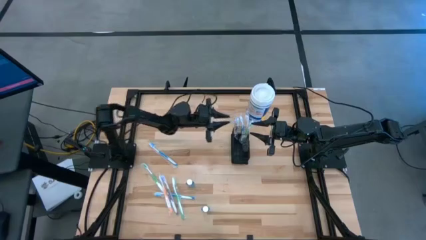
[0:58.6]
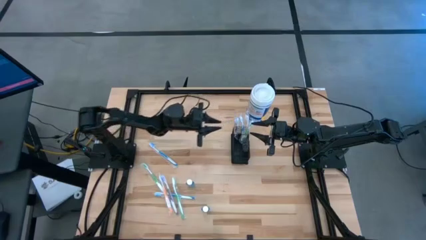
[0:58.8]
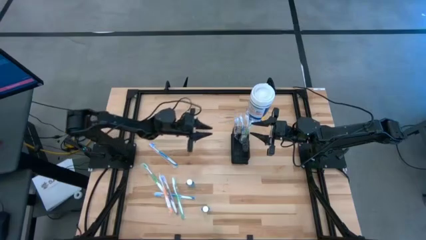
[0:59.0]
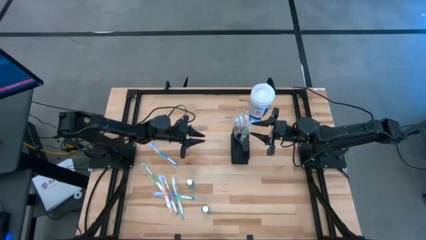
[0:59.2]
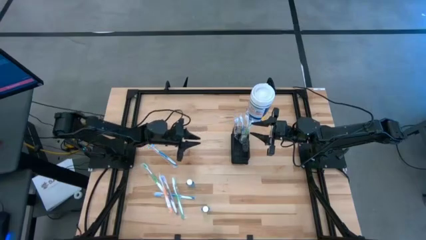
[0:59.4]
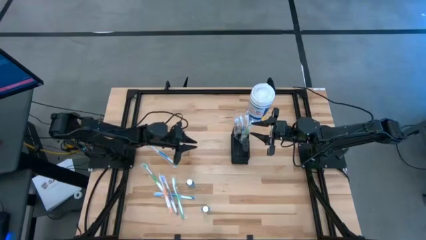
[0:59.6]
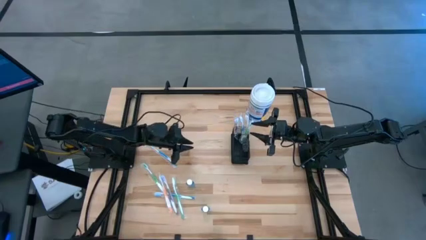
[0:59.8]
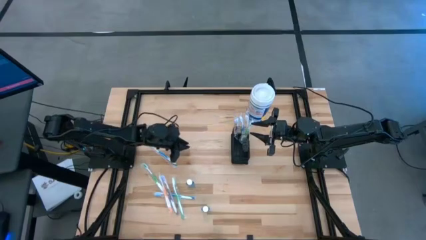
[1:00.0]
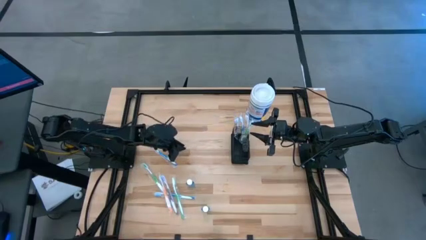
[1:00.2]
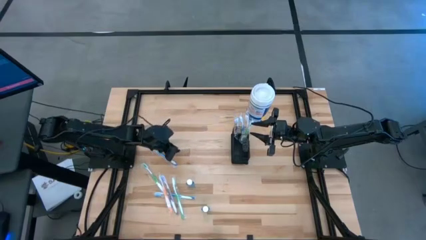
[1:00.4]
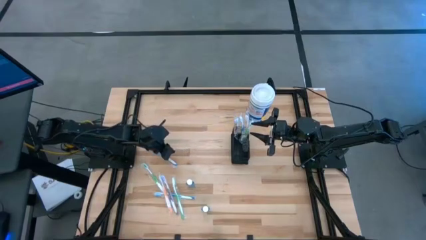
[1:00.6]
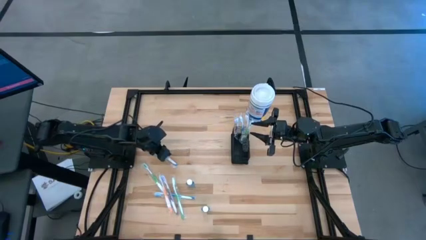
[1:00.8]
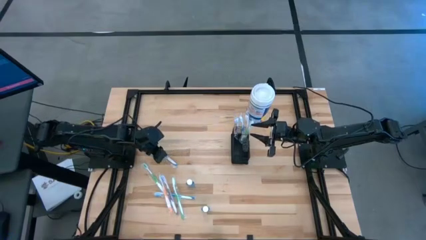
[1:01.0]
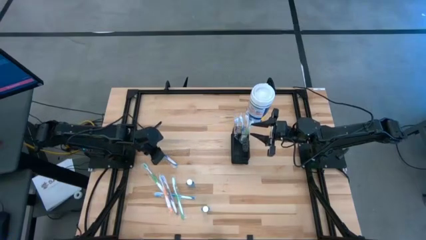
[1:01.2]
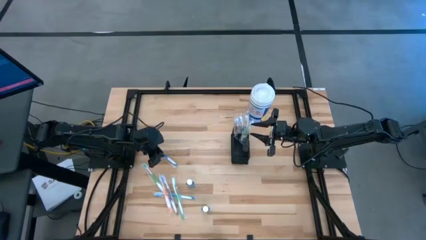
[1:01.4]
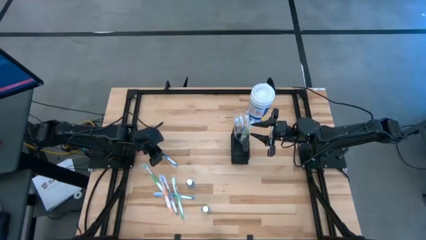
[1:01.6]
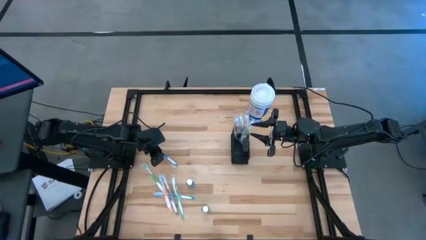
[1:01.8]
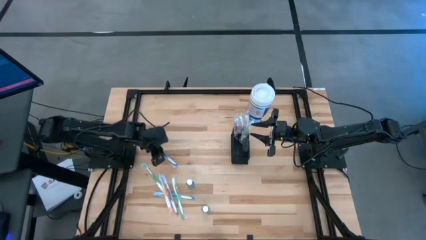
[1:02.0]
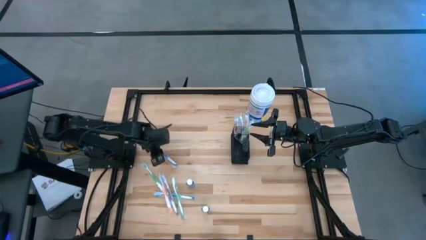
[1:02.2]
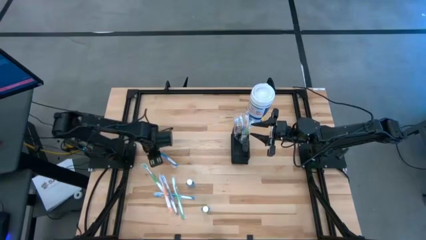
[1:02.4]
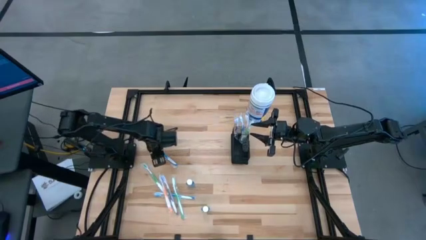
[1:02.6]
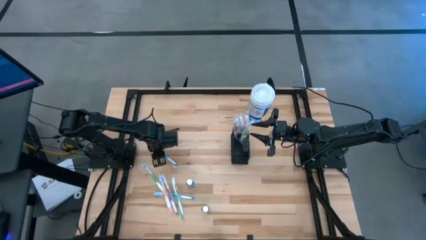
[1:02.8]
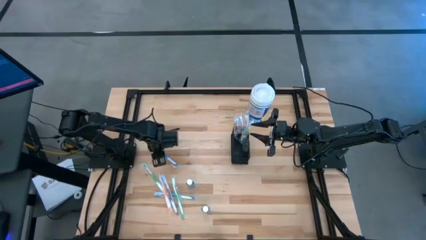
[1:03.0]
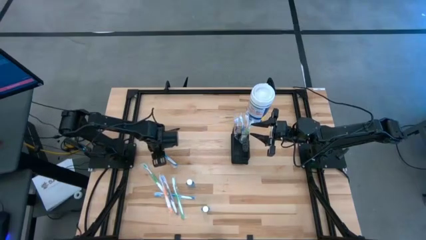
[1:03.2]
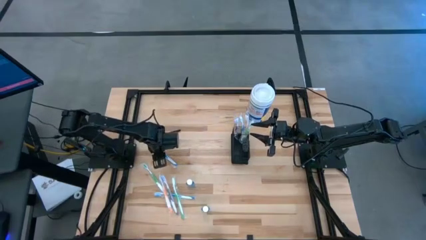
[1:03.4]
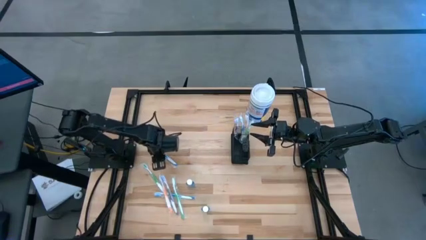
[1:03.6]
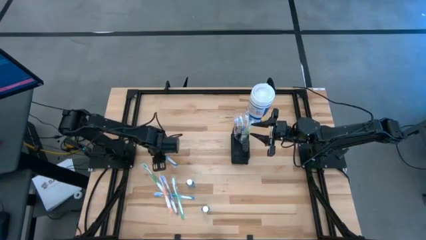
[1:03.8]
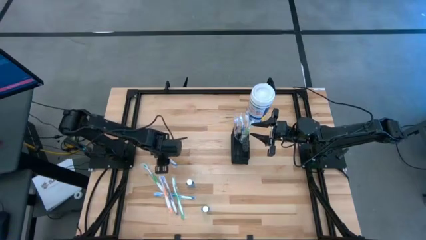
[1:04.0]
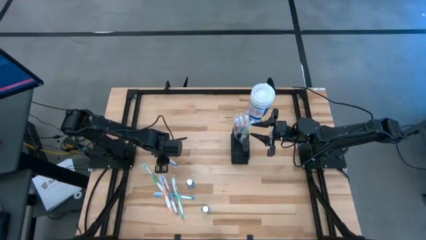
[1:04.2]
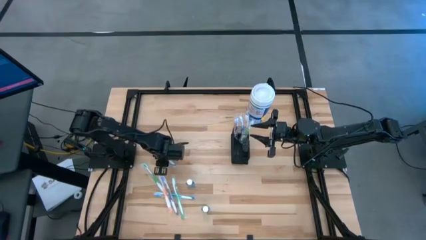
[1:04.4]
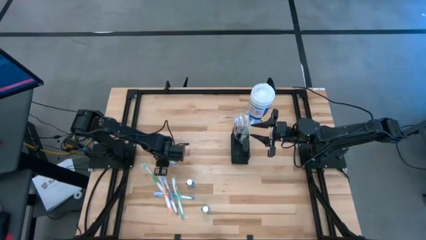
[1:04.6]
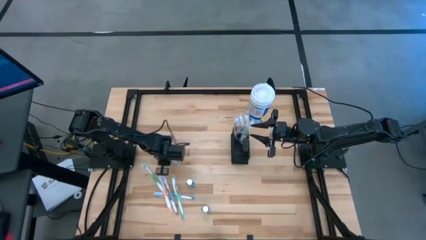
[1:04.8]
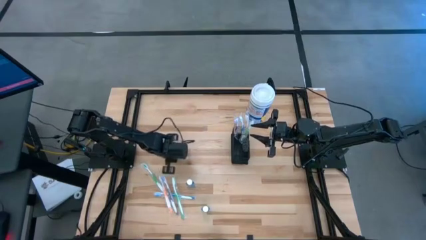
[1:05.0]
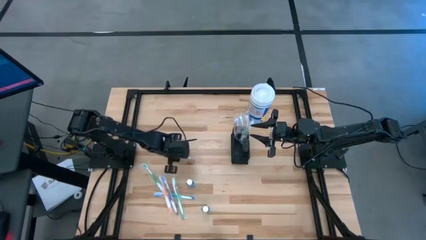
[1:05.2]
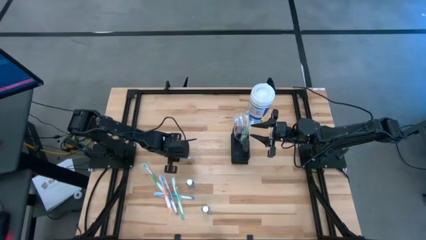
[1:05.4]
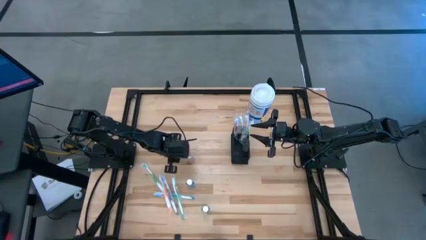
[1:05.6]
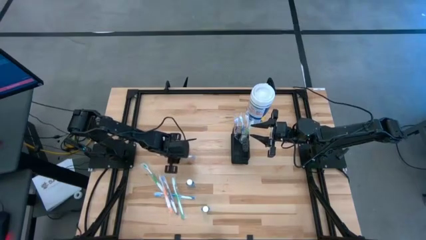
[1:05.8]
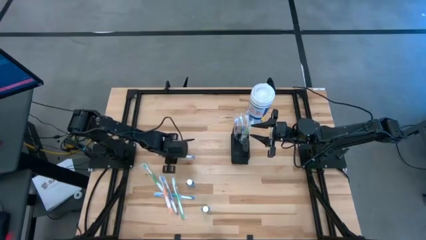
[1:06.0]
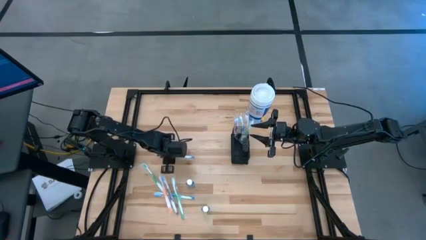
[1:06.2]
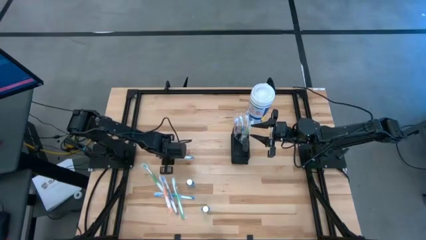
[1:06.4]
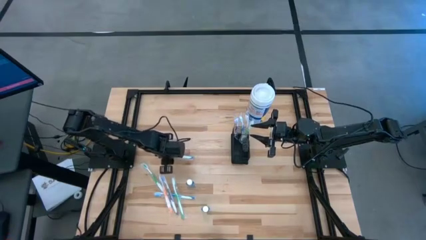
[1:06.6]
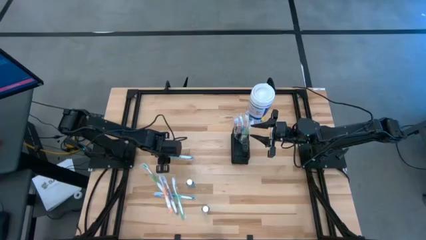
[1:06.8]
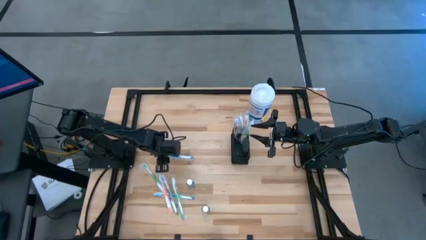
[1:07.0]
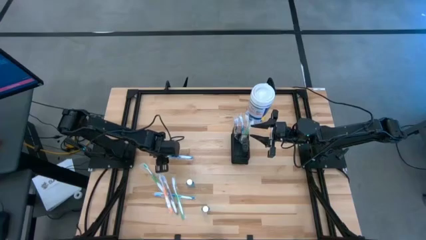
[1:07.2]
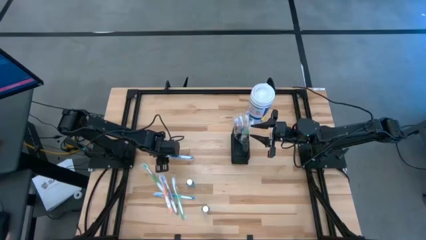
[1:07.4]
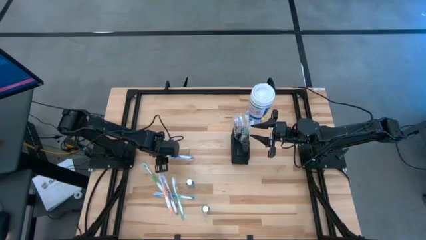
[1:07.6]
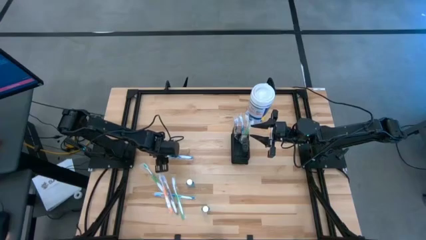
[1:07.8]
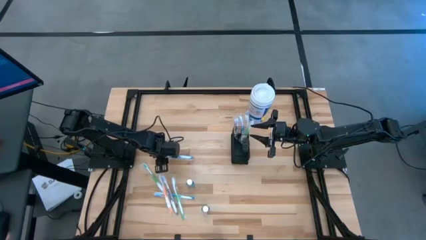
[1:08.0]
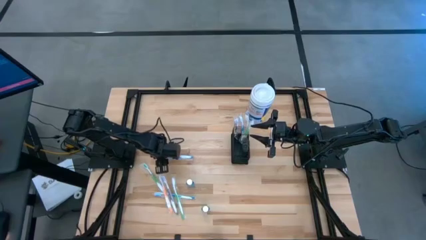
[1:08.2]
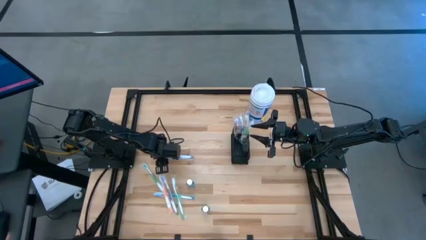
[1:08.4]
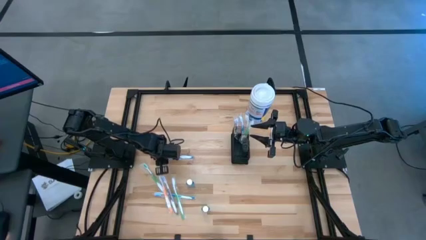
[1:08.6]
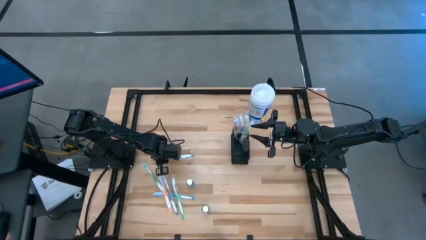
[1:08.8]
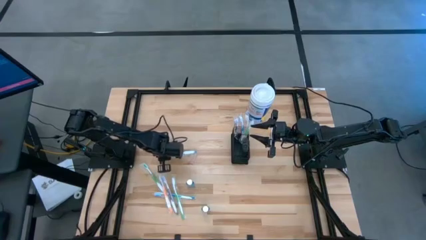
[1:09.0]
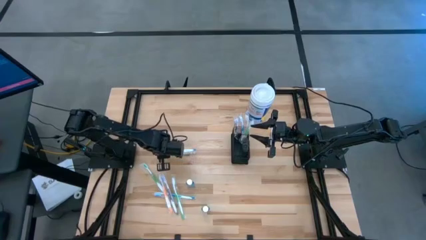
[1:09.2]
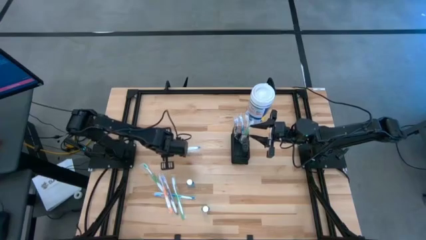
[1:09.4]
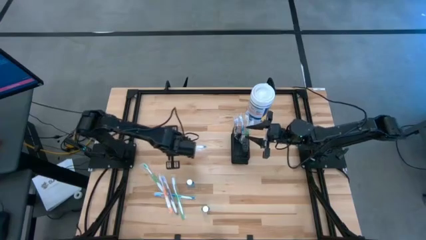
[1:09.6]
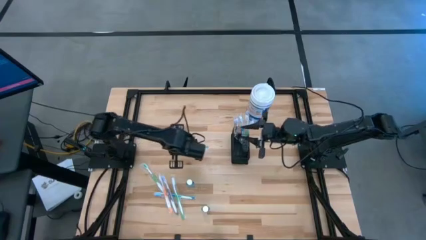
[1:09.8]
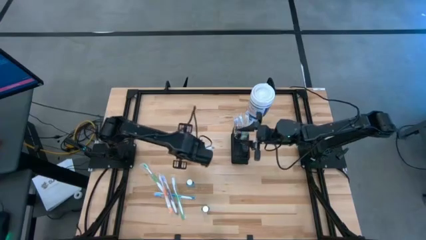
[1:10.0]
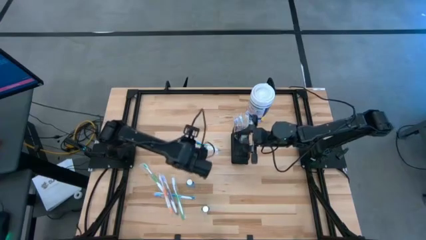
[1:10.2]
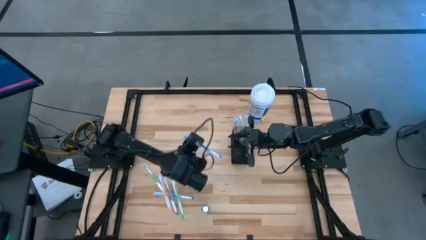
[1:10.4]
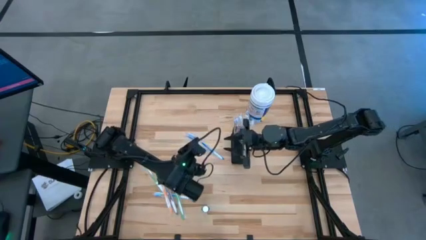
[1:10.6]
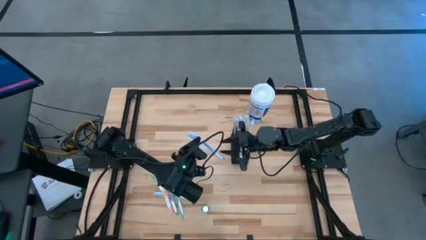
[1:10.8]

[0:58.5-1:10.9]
Task: Pick & Place toothbrushing station
Put the top blue toothbrush into the wire mesh organizer

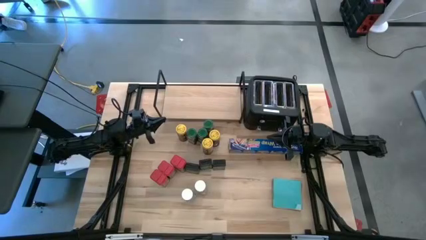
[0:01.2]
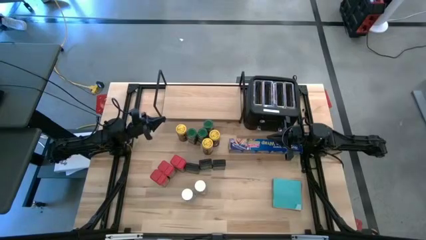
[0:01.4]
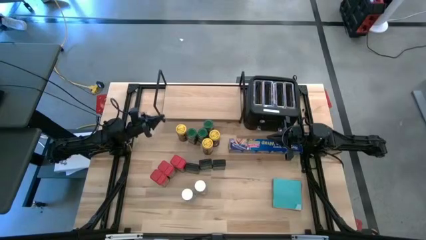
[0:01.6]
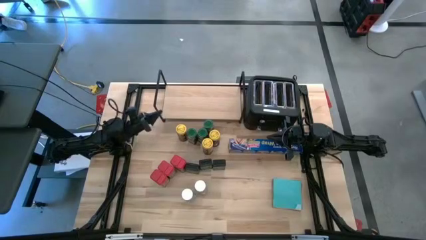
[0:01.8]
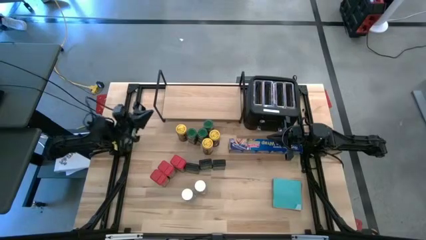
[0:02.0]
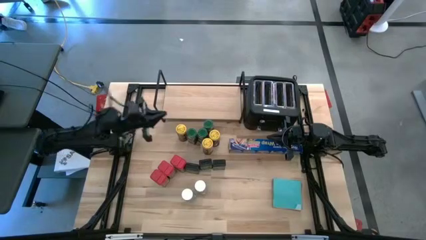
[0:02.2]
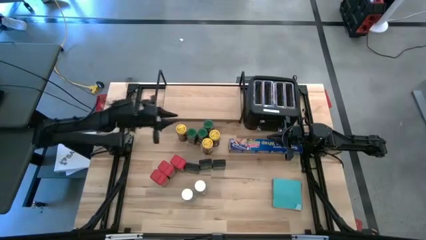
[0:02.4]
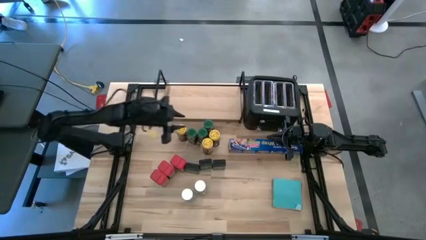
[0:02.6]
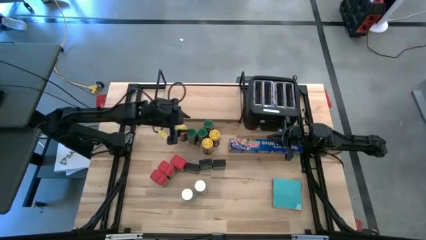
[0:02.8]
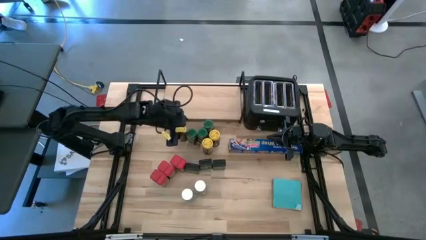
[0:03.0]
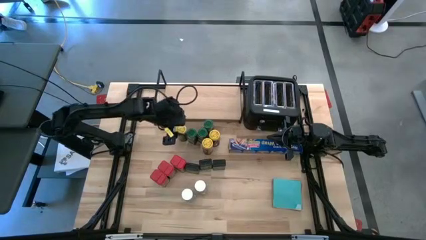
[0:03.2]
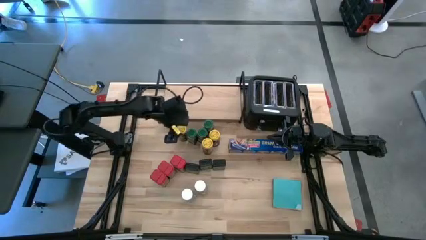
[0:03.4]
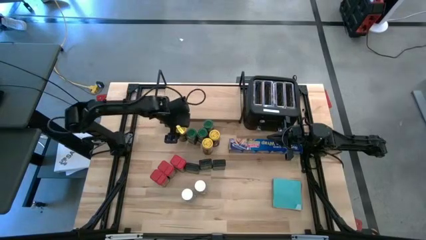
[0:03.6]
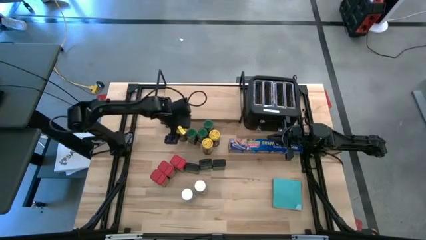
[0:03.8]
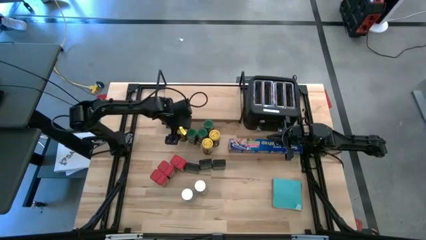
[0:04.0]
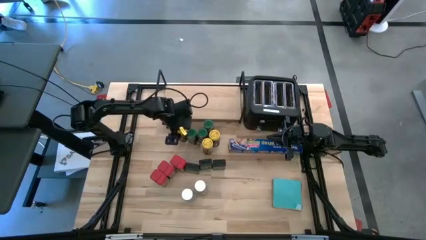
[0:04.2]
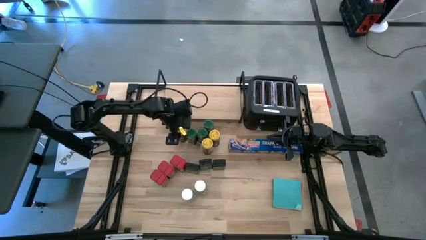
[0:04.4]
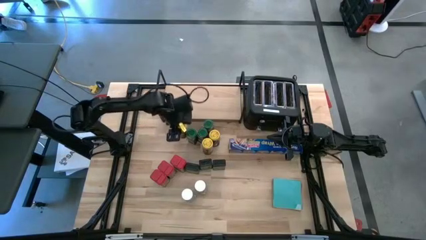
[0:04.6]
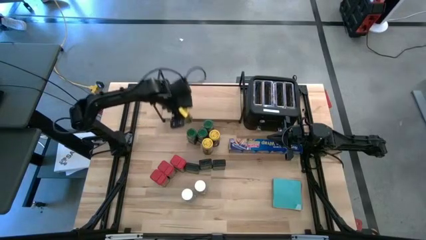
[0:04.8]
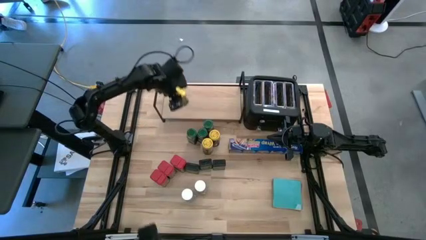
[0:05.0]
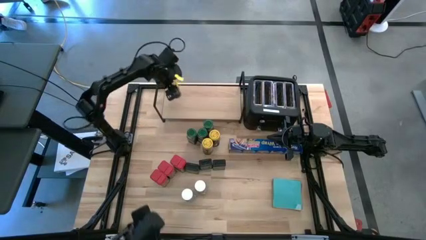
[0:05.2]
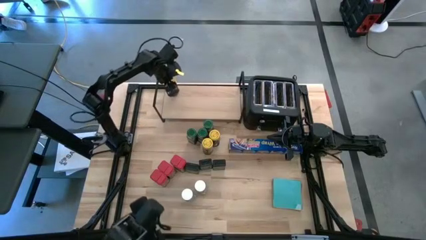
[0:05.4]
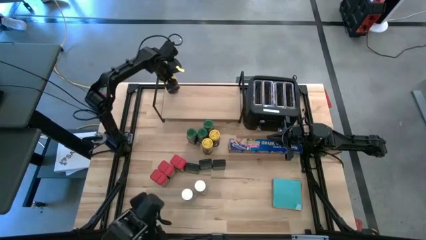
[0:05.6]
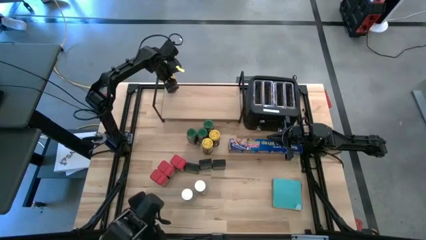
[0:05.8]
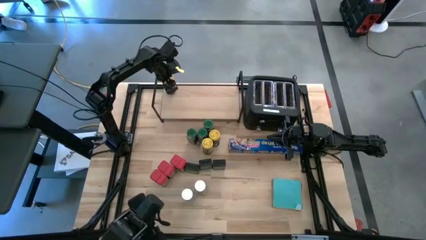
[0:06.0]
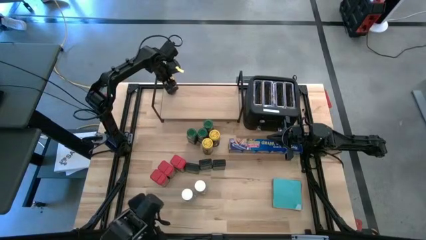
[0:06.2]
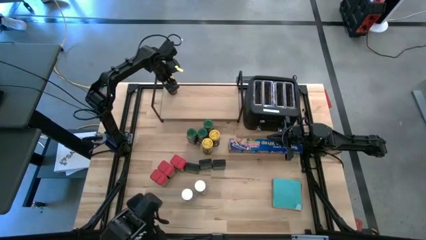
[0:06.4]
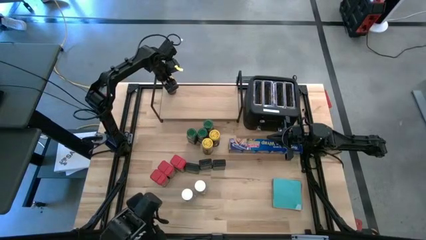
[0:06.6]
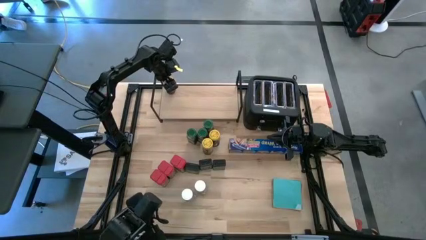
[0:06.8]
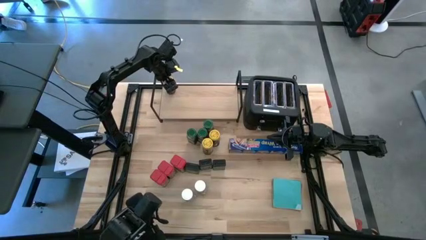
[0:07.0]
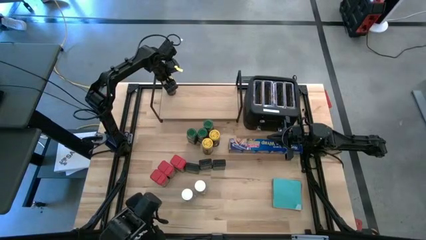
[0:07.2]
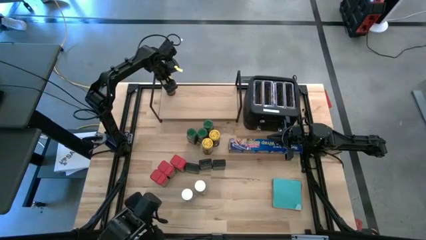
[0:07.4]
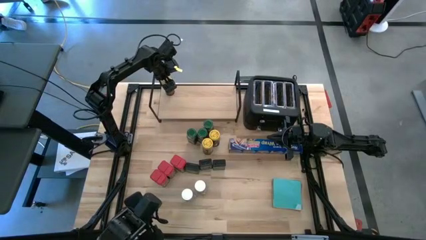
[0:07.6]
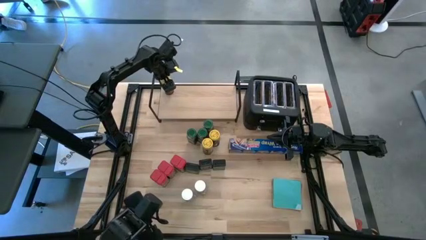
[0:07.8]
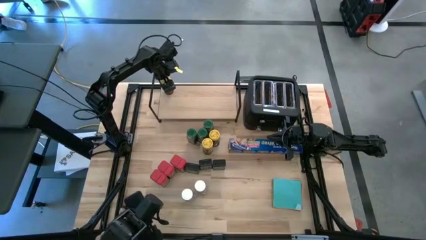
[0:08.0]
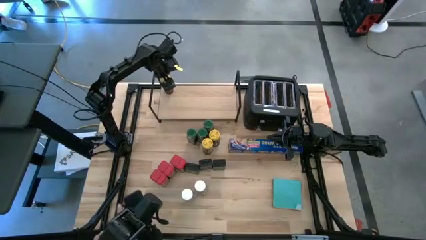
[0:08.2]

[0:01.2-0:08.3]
Task: Shelf spices
Put the left yellow seasoning bottle on the shelf
